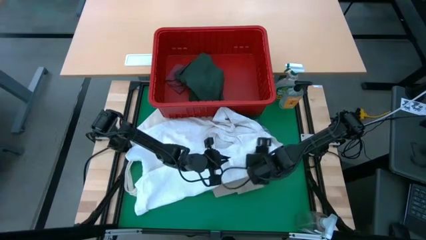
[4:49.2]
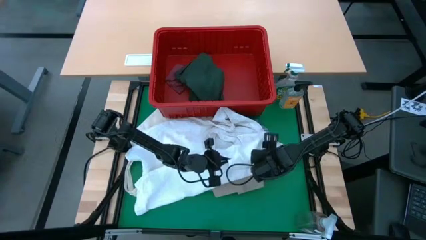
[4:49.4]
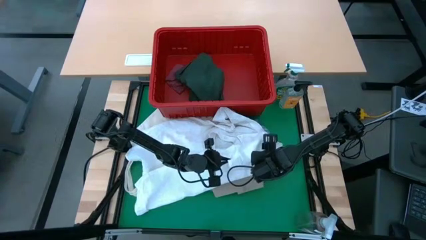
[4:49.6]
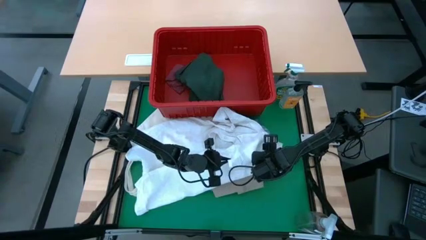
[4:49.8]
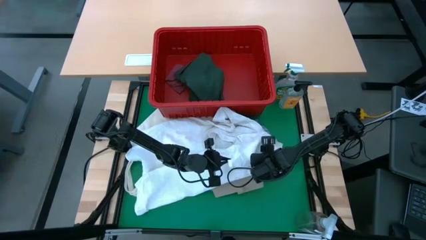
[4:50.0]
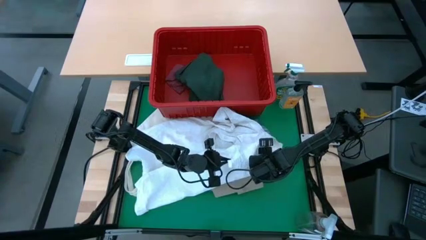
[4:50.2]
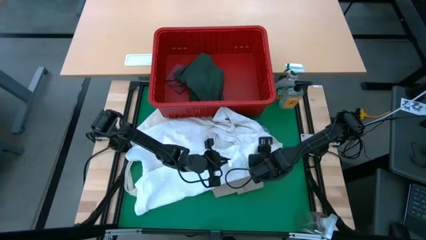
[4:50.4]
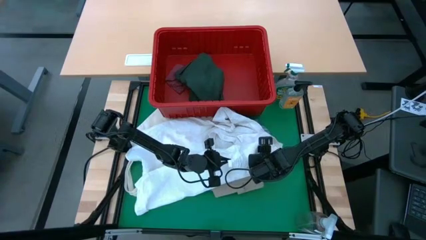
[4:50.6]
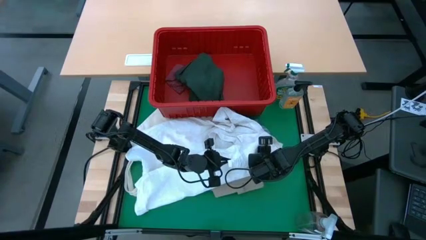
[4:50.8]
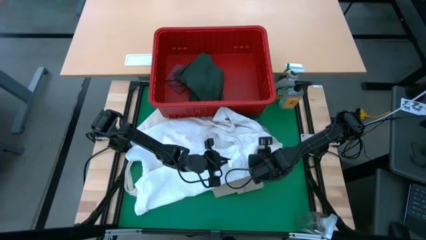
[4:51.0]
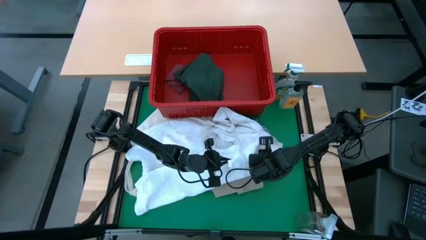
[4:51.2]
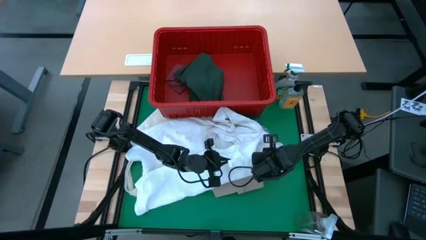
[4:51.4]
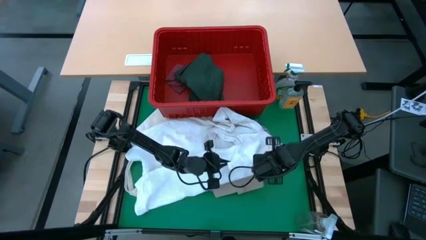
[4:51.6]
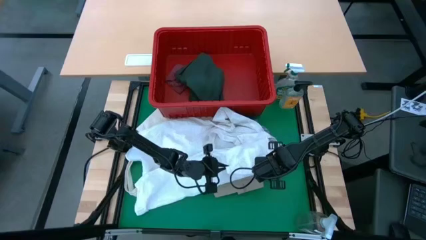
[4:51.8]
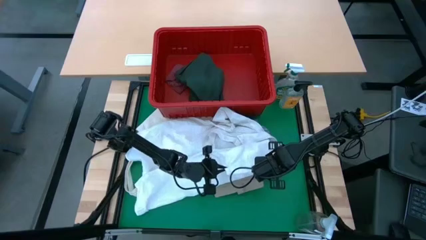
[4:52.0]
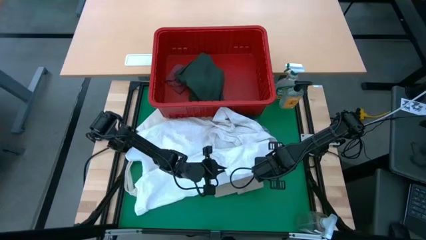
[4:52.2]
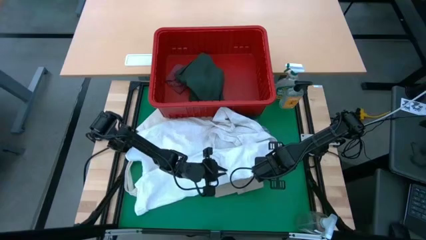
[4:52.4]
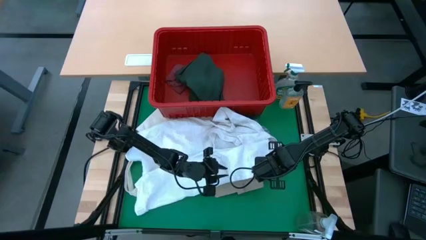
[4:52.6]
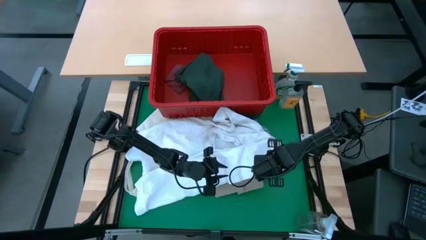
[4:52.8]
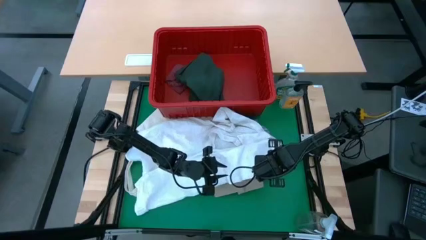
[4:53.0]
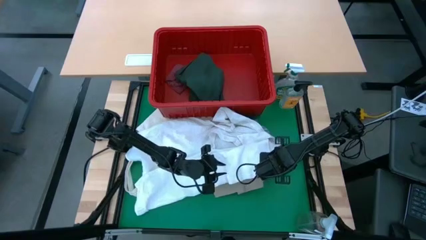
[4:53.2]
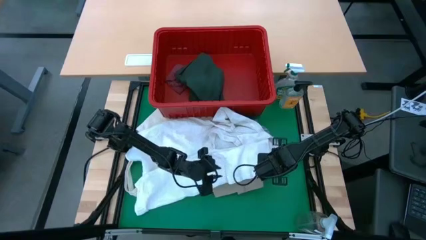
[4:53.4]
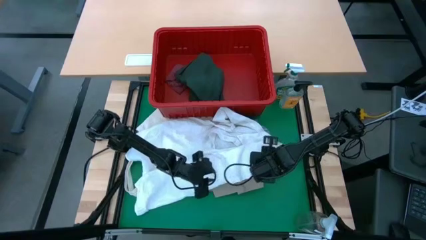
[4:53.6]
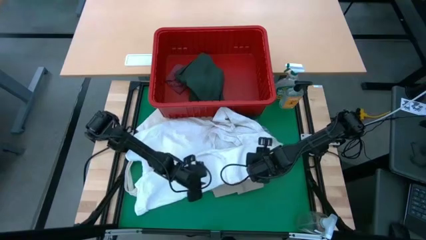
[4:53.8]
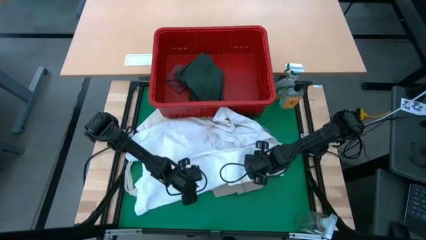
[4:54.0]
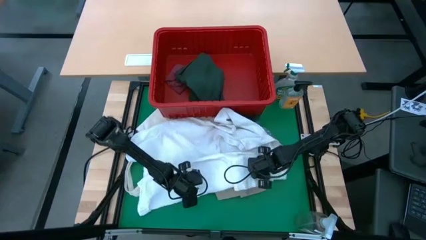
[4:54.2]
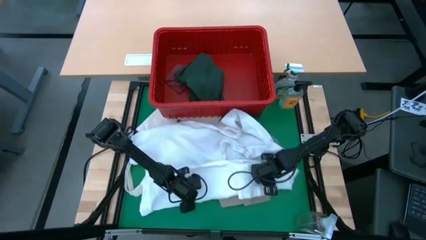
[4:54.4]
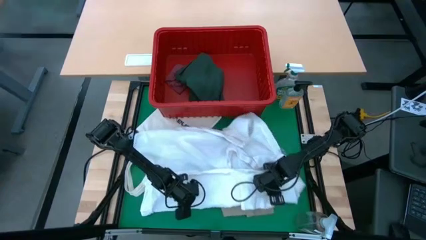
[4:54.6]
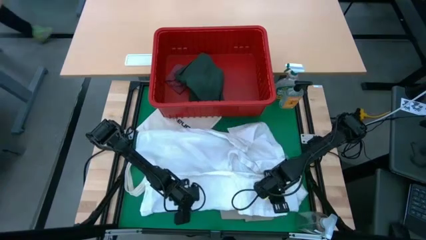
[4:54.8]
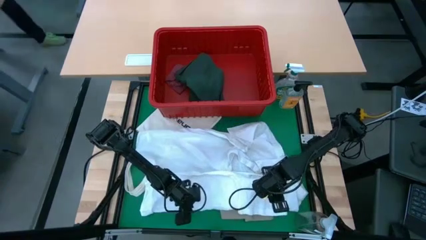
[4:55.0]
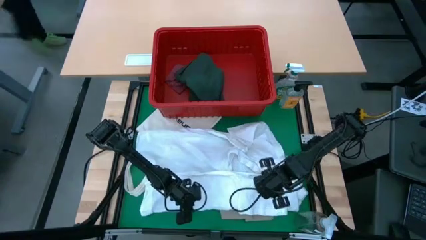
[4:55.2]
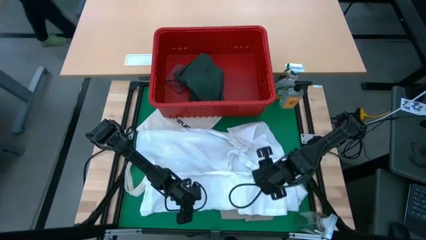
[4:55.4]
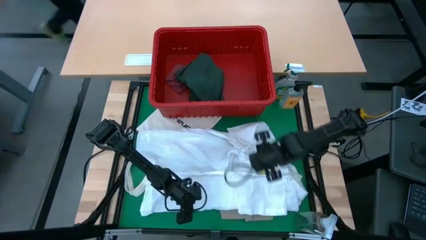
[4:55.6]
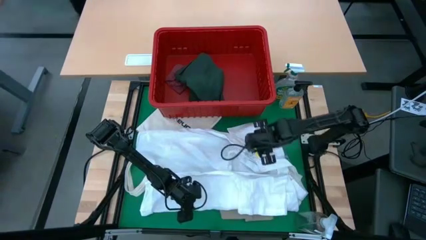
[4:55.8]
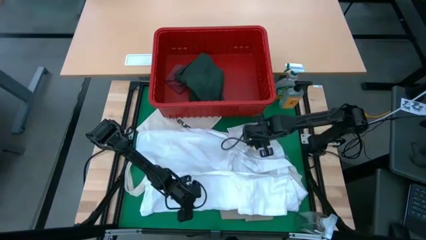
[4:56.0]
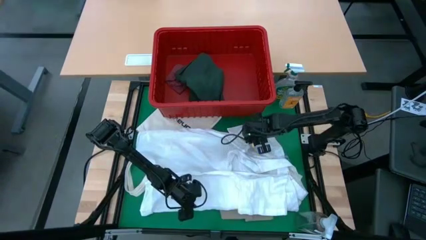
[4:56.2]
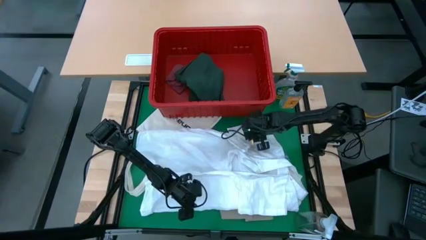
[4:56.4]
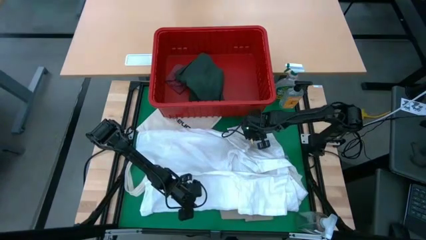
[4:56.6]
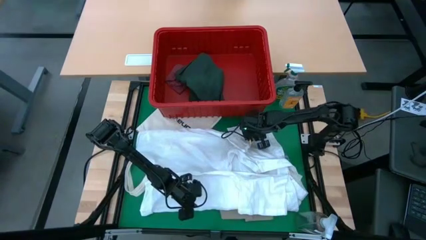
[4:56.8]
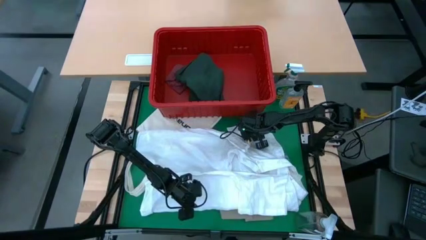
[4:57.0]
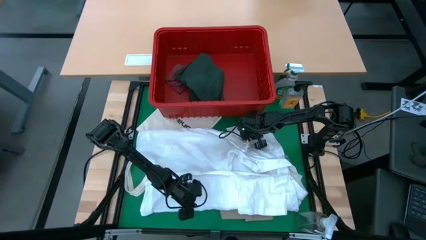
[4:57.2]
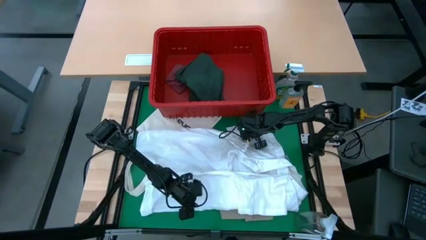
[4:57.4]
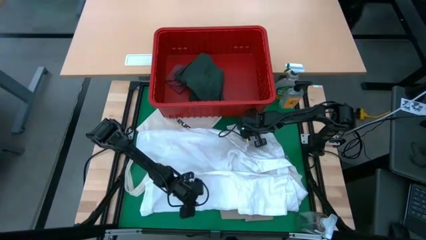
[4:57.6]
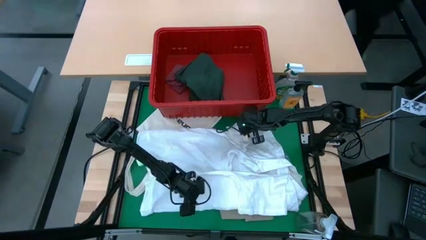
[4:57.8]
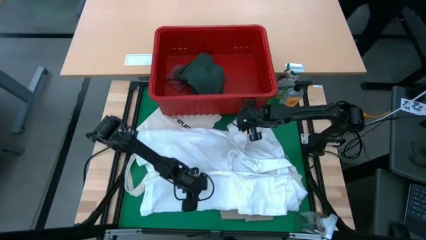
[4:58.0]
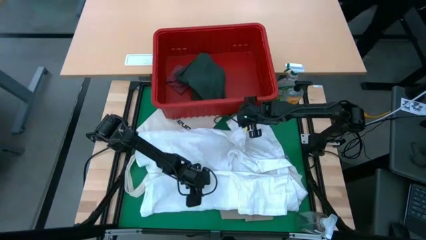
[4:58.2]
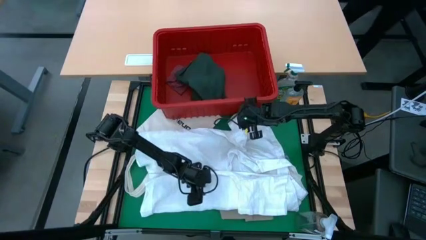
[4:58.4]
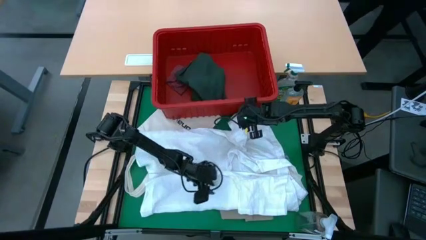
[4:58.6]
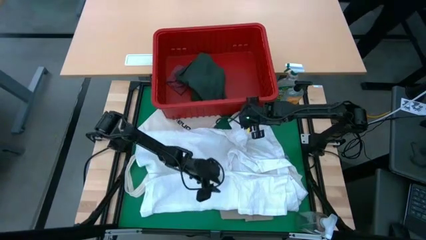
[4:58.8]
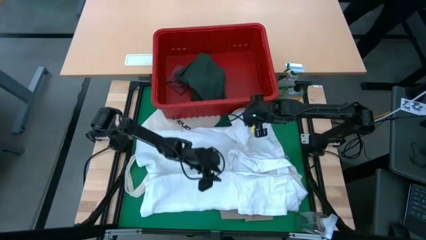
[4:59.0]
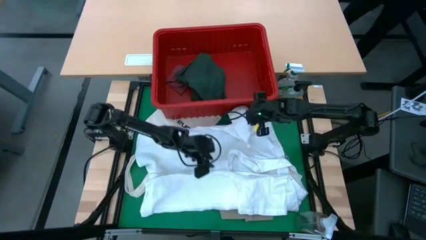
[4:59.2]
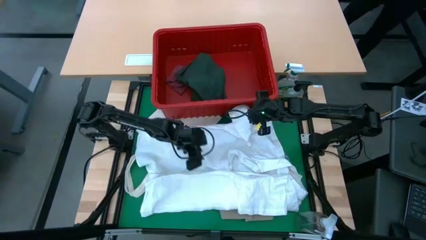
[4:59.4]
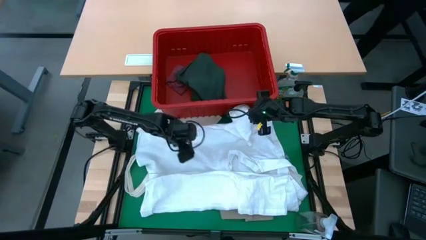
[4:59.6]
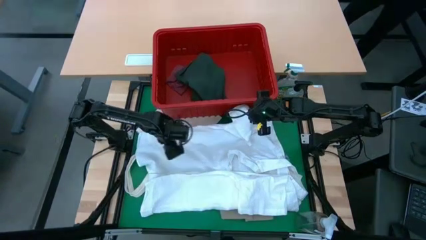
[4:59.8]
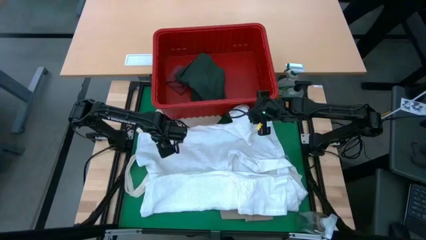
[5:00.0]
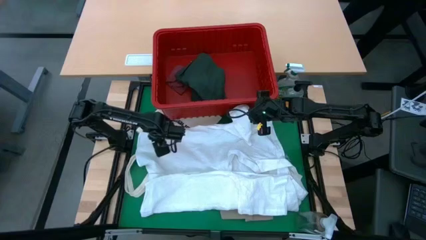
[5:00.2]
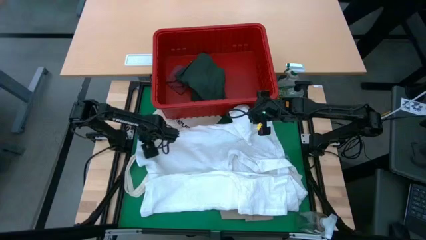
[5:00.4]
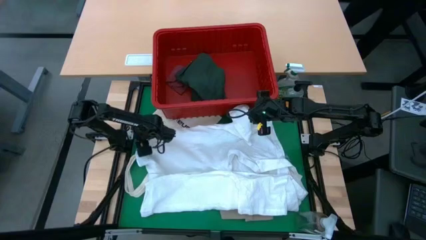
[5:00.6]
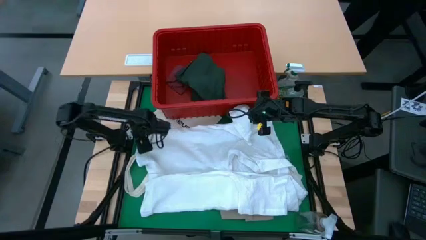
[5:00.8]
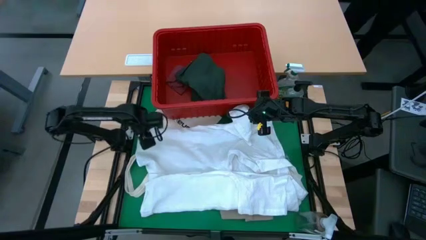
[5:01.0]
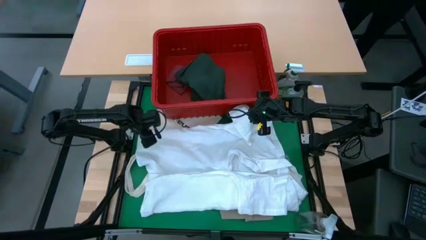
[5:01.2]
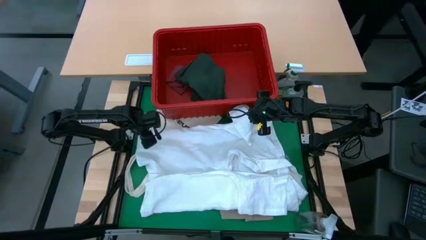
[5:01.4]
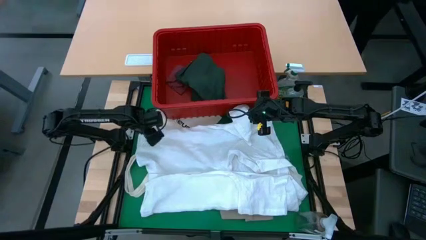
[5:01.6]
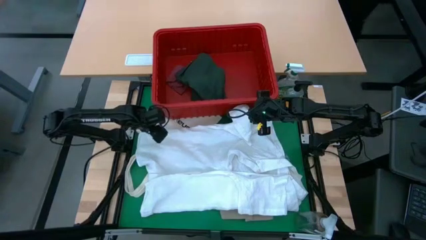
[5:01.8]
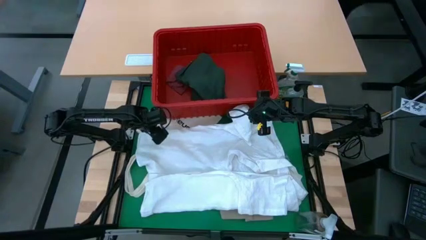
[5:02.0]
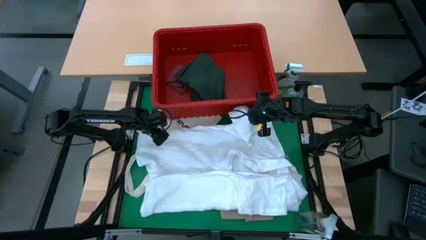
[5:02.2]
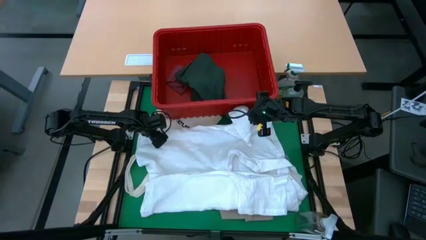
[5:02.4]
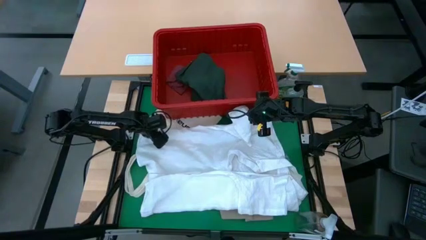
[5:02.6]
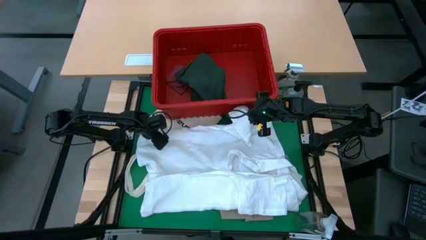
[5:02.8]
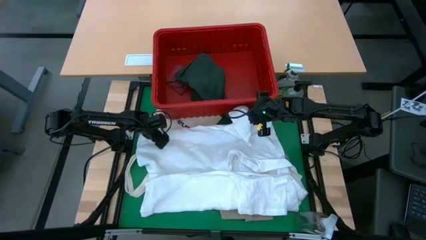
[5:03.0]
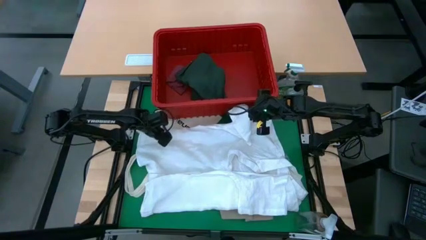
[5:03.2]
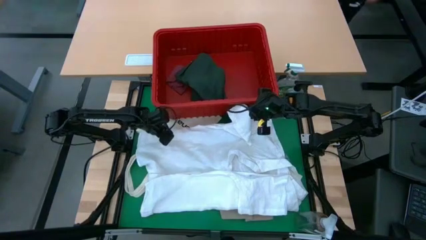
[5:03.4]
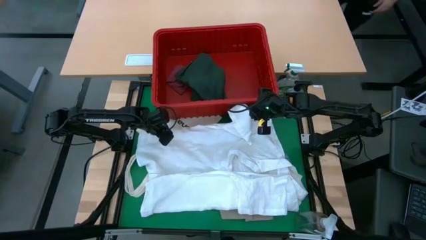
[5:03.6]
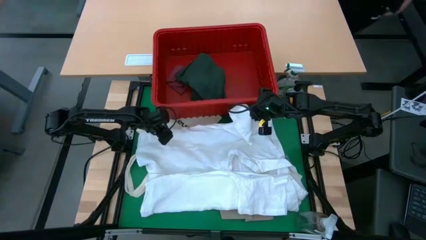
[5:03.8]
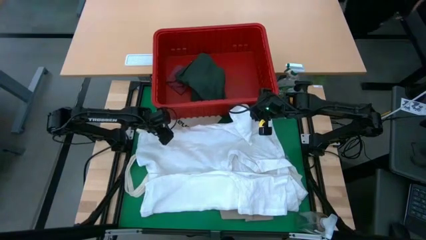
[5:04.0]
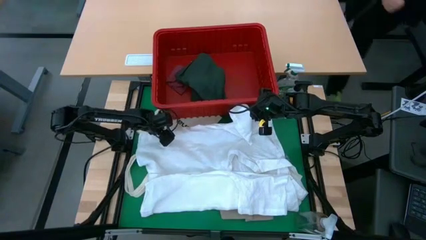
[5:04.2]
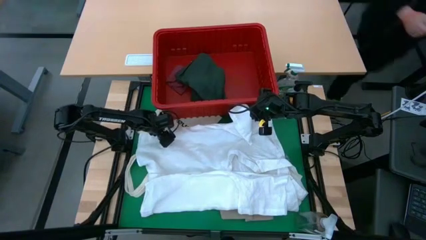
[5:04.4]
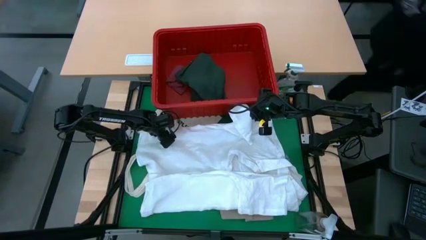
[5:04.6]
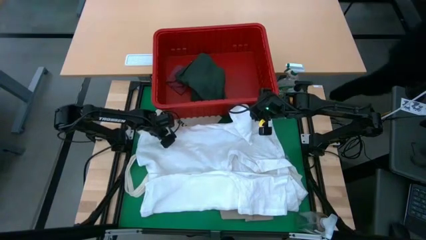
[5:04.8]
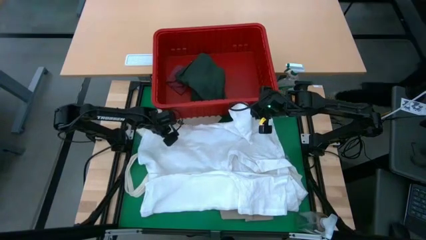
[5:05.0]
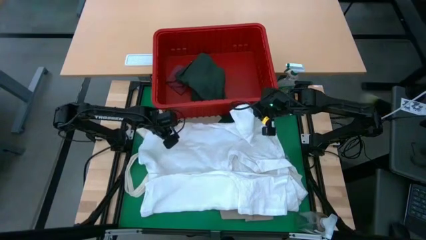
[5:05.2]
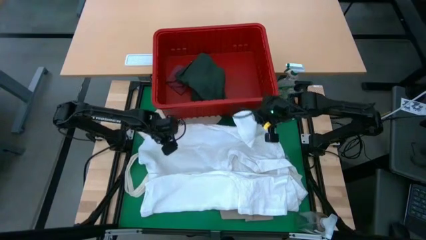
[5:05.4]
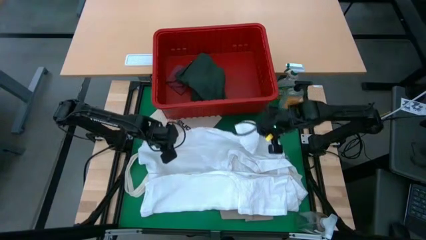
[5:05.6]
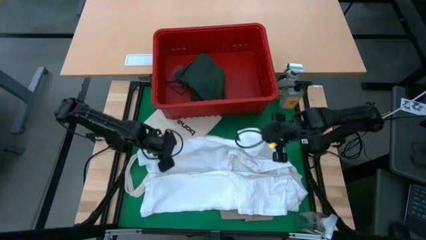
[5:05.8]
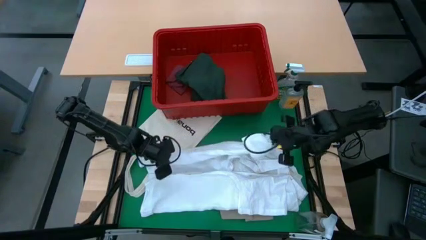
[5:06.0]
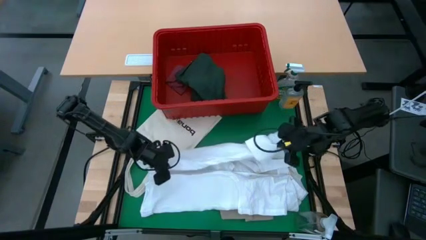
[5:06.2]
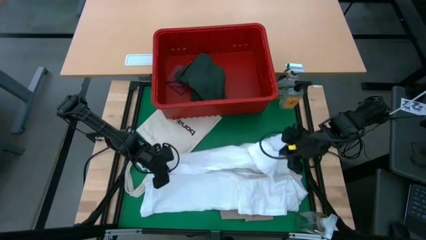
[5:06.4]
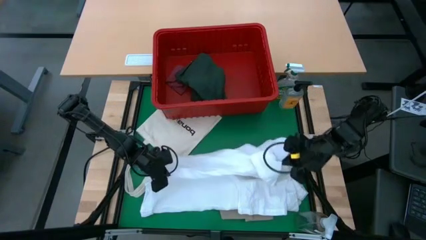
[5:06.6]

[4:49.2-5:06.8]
Task: Fold Laundry from Bin
Fold the white polo shirt
